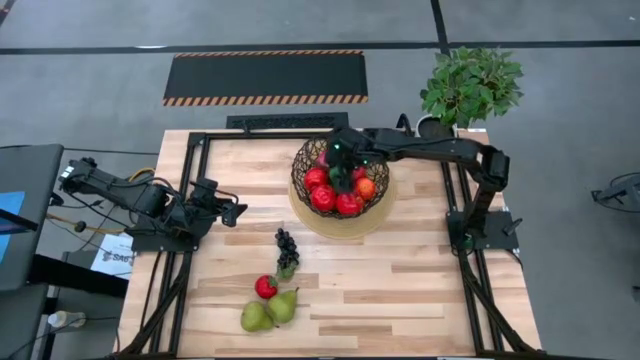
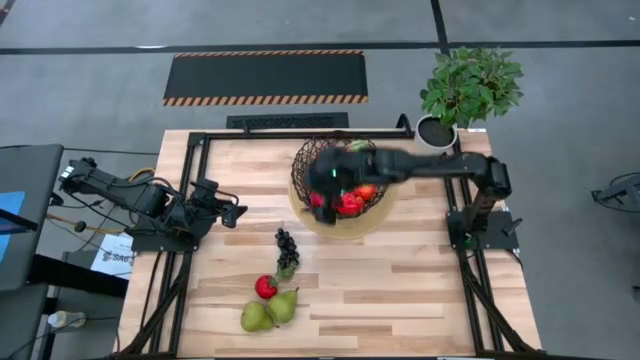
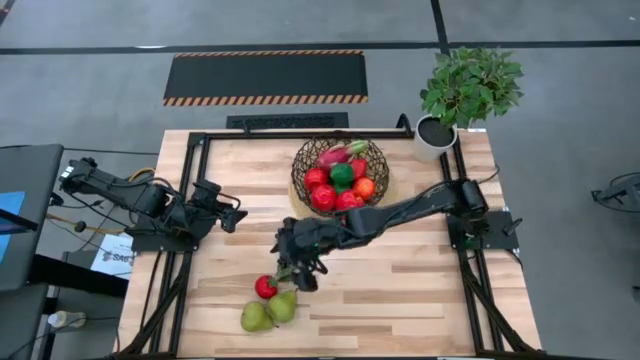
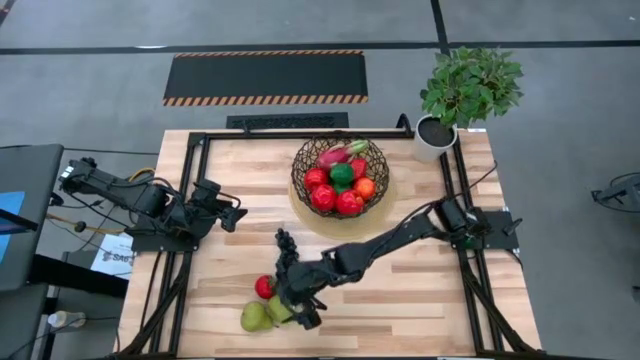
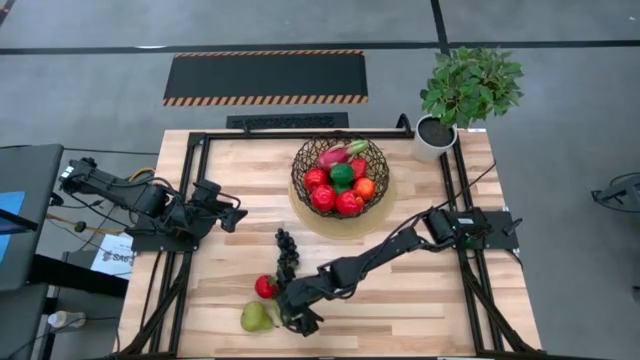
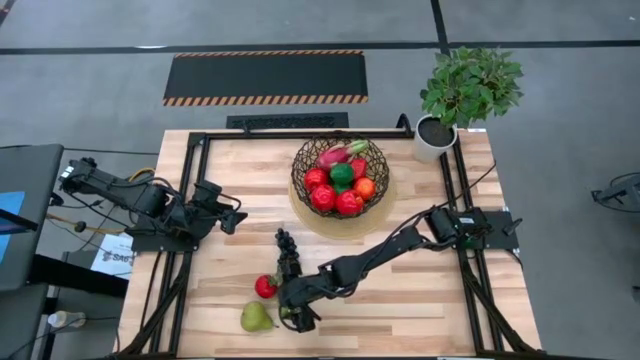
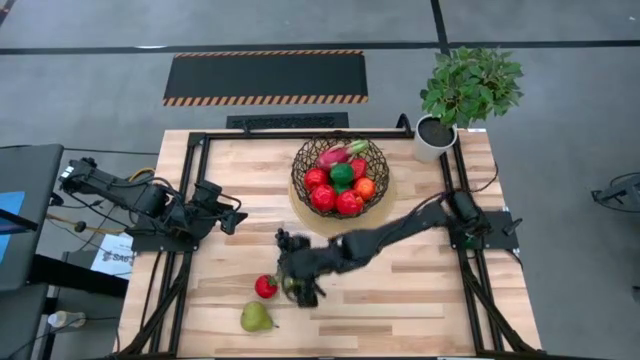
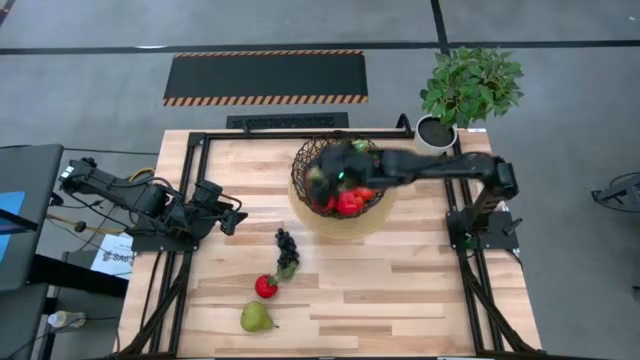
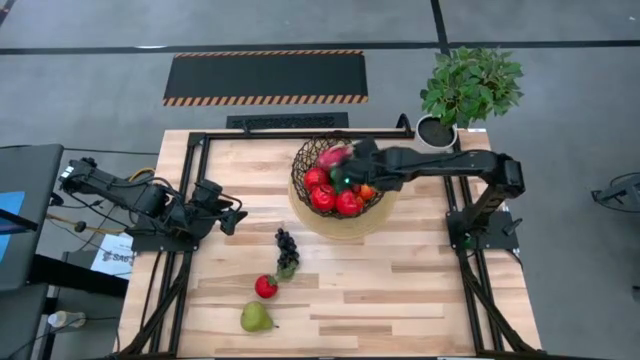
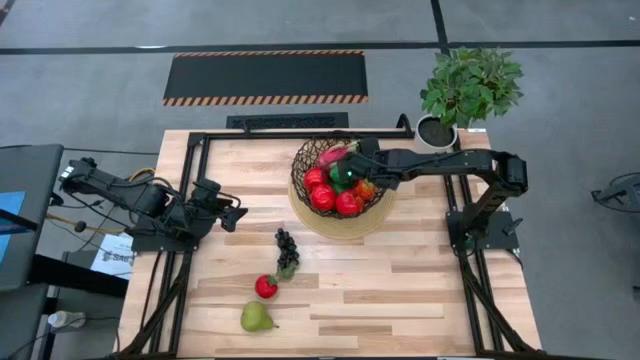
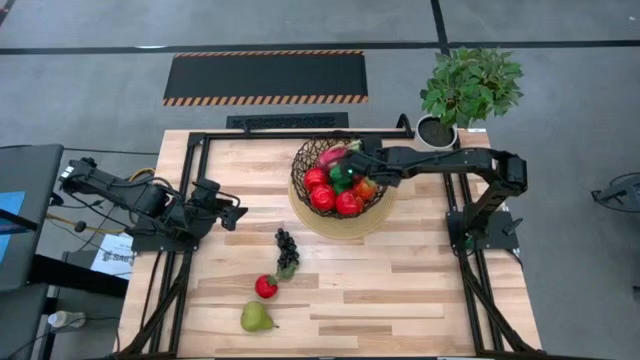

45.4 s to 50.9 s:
Task: Build produce basket
Put the green pear into the black wire basket

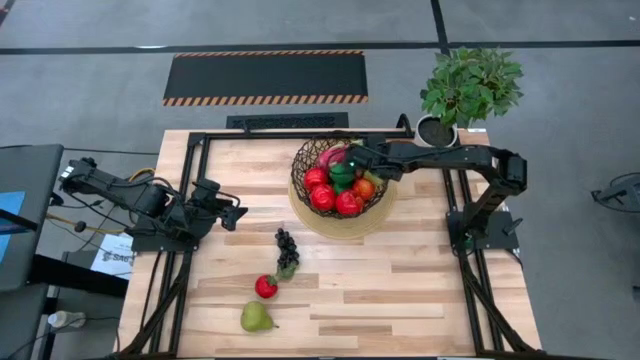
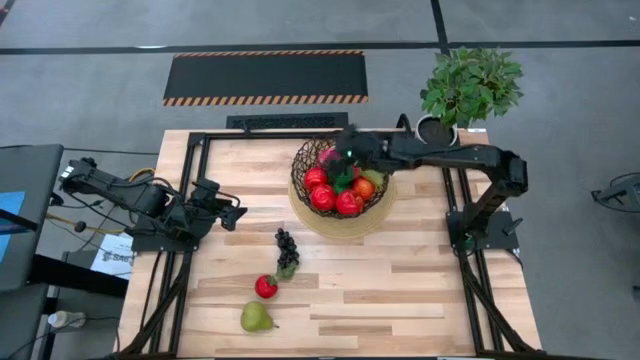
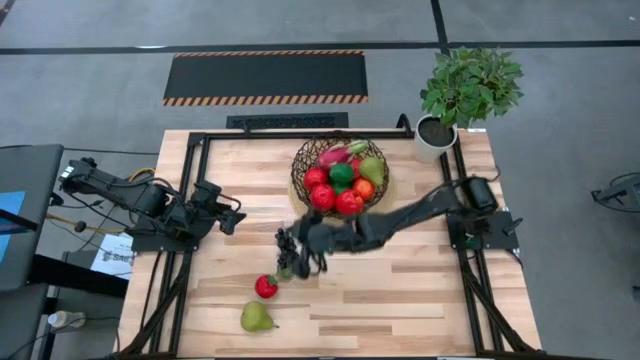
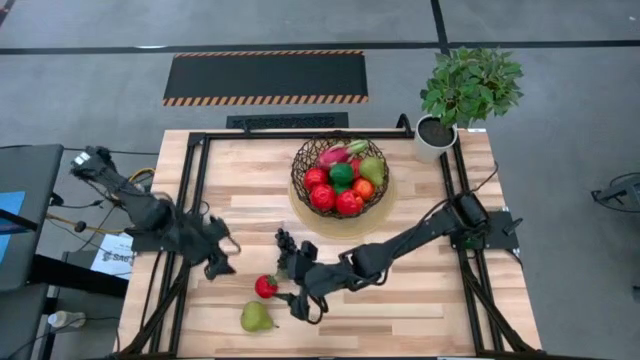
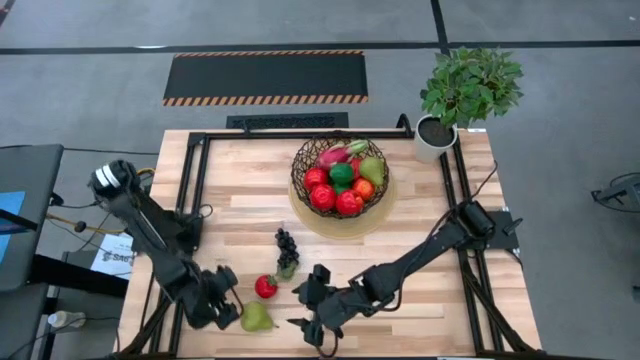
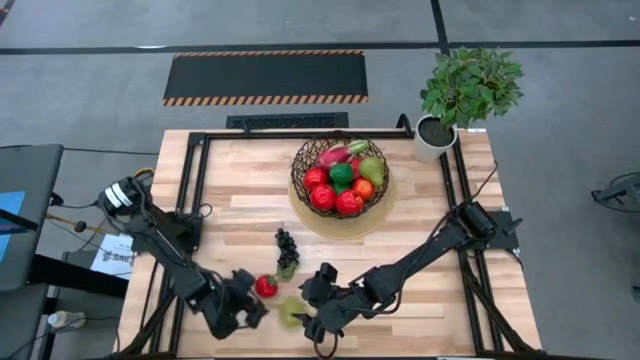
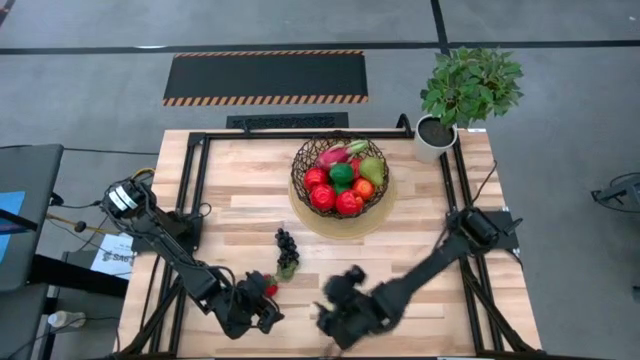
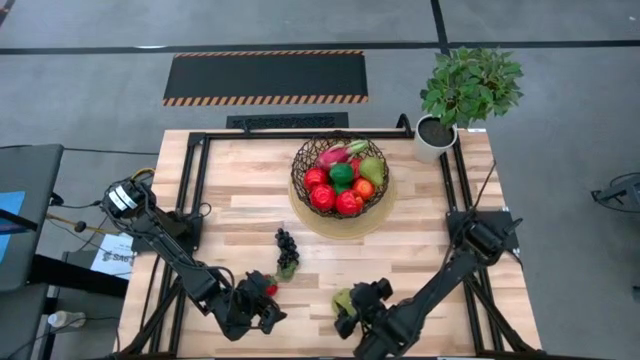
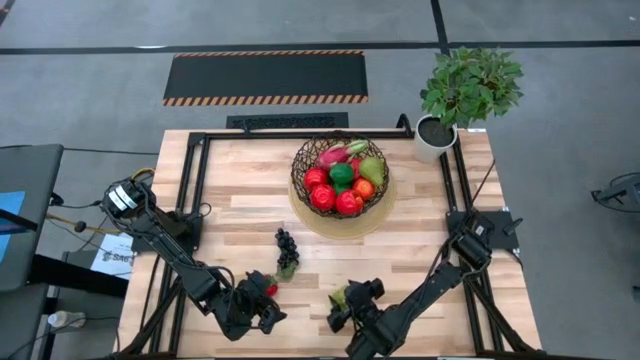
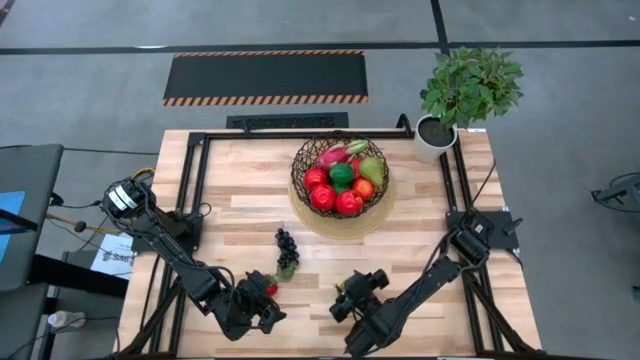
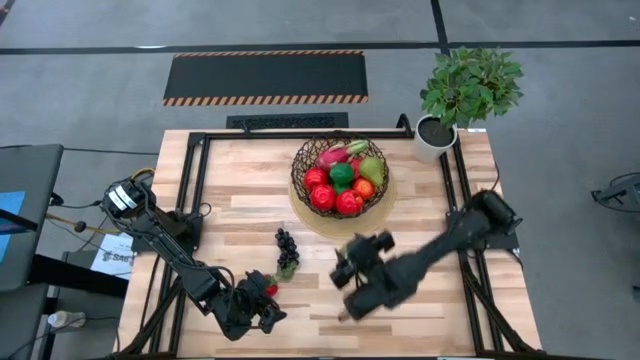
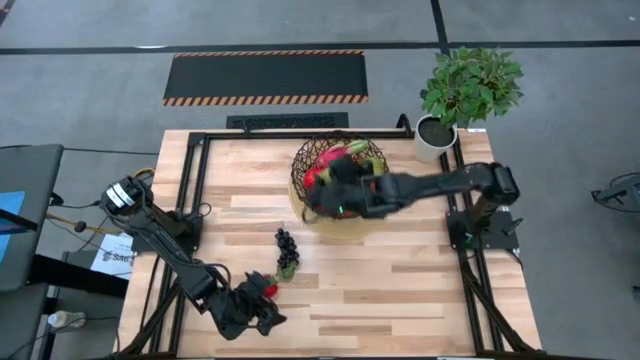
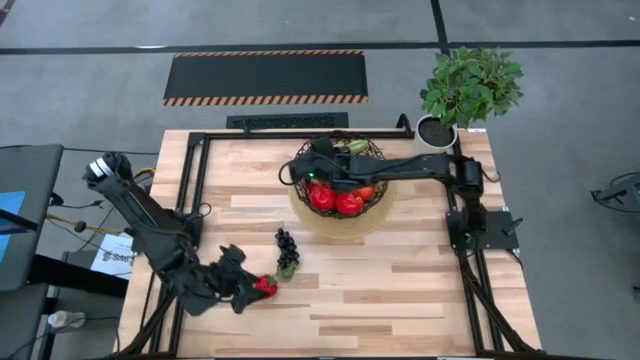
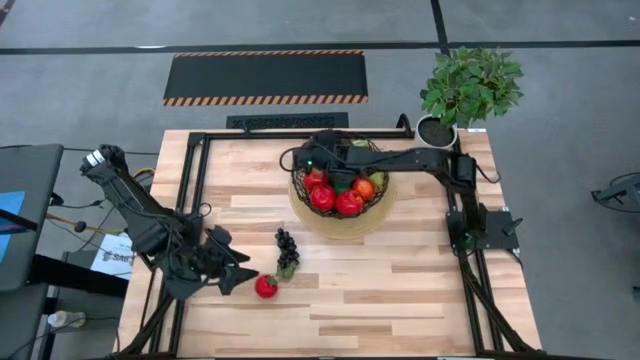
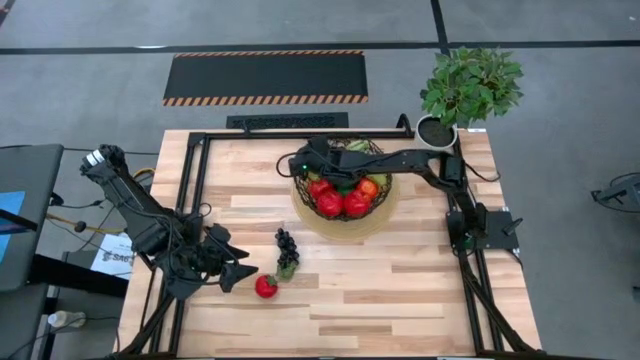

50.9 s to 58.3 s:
Put the green pear into the black wire basket

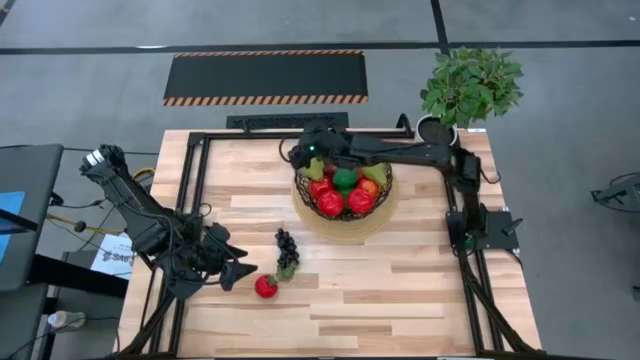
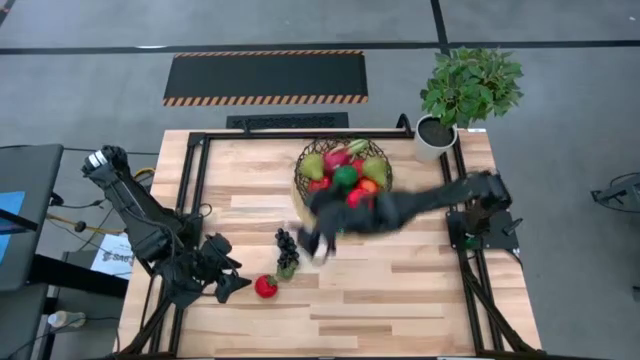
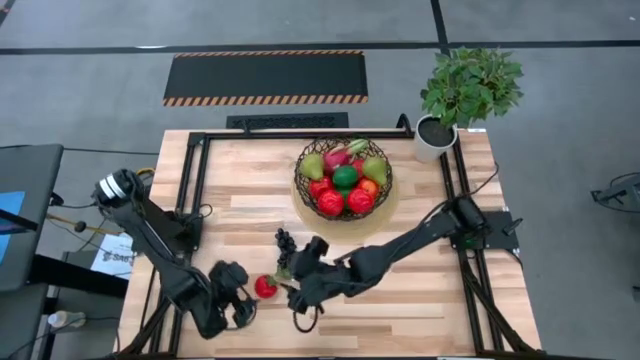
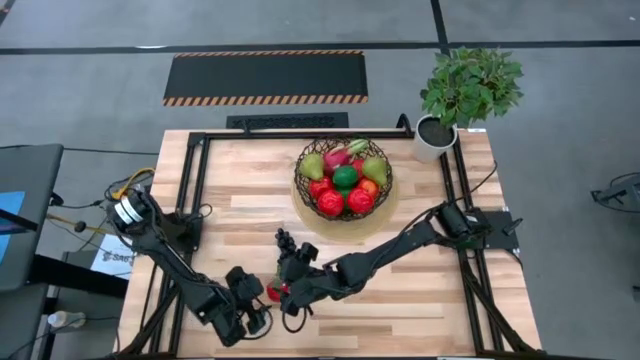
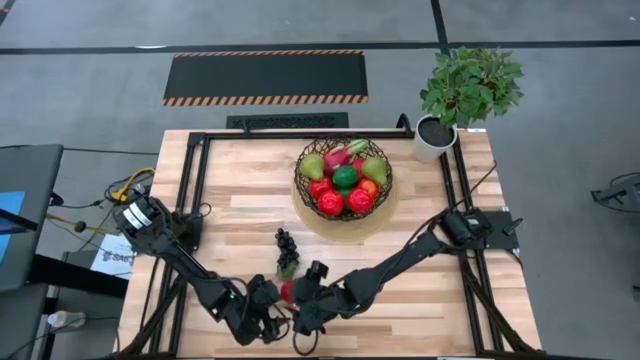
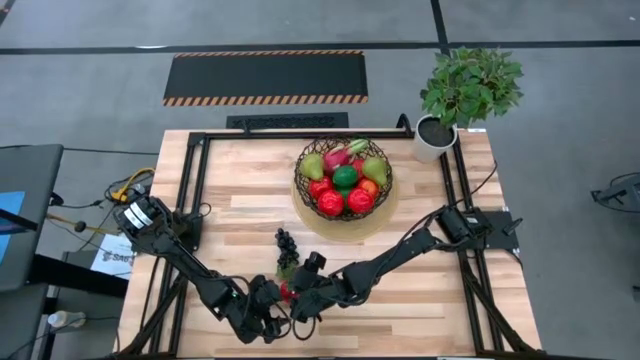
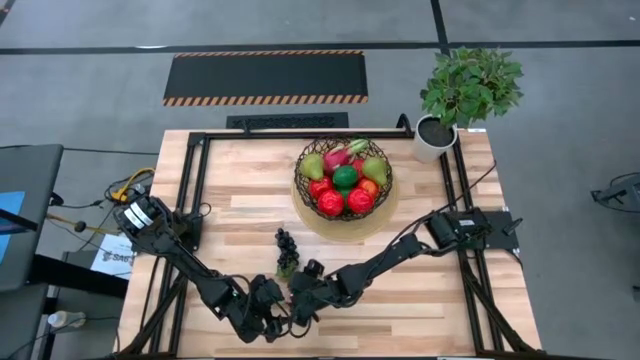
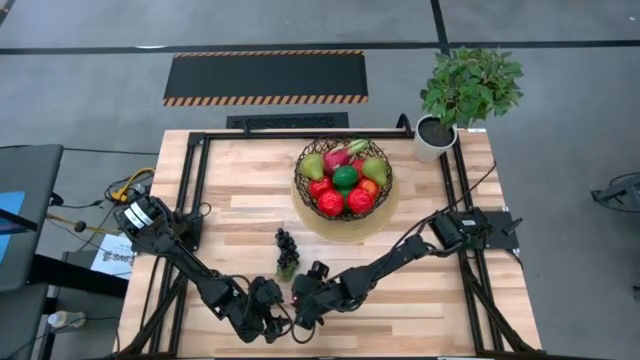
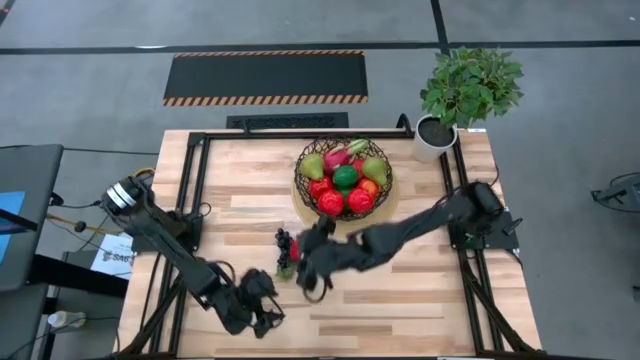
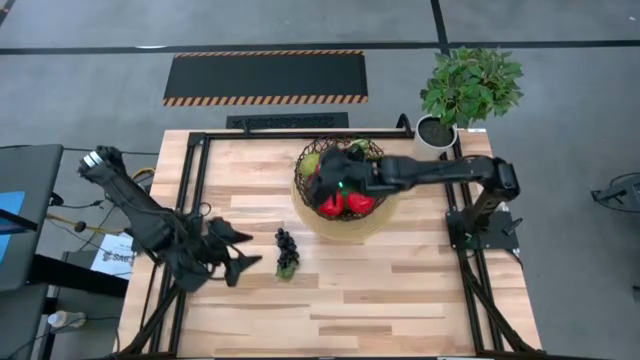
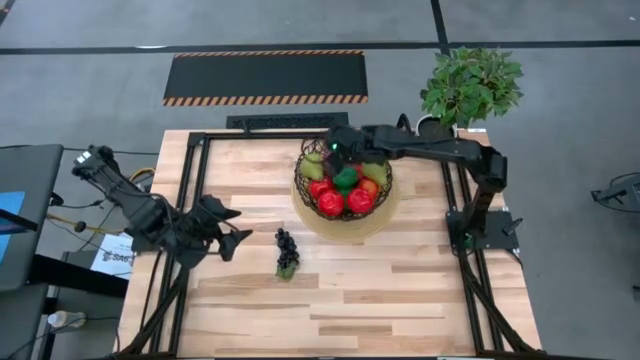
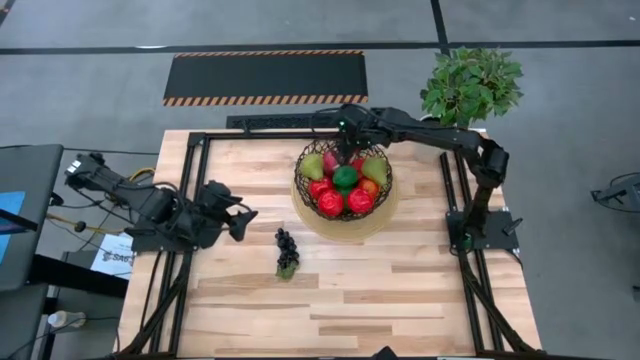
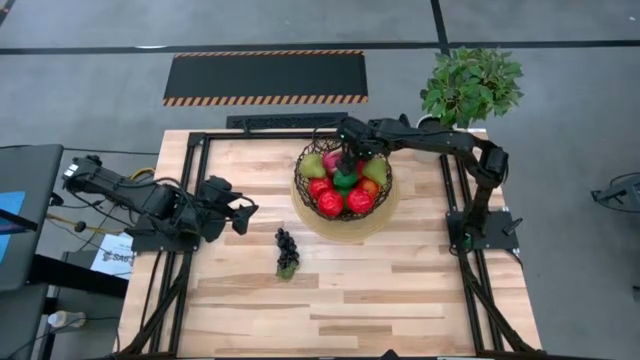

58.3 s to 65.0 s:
Put the red tomato into the black wire basket

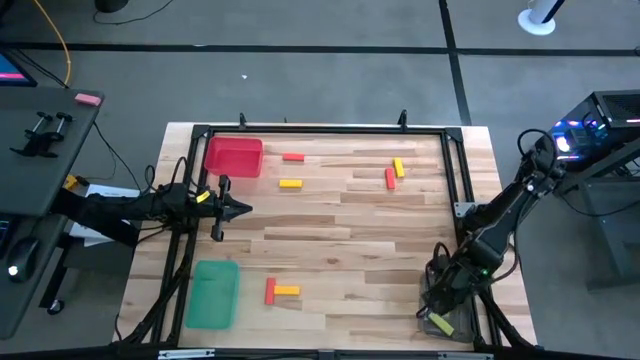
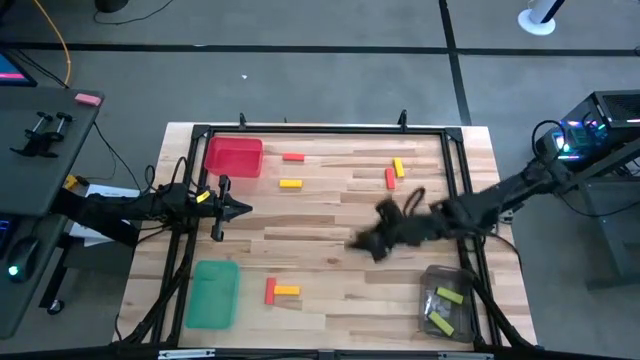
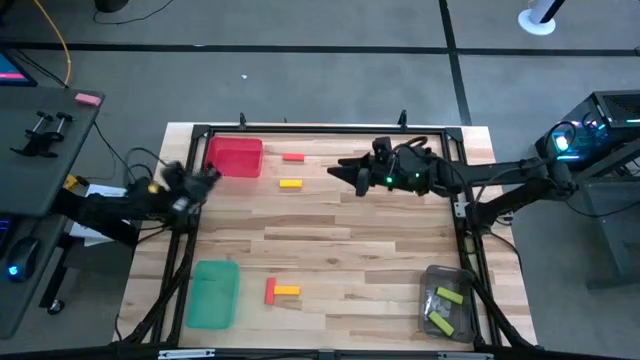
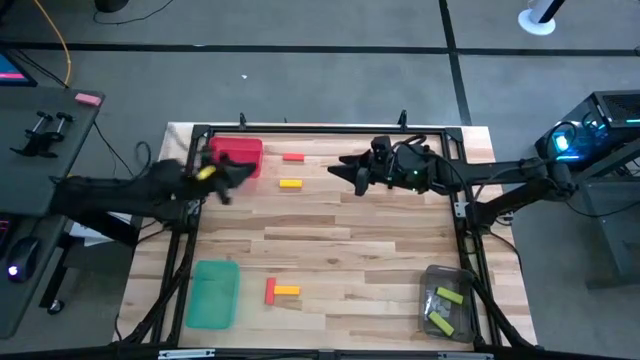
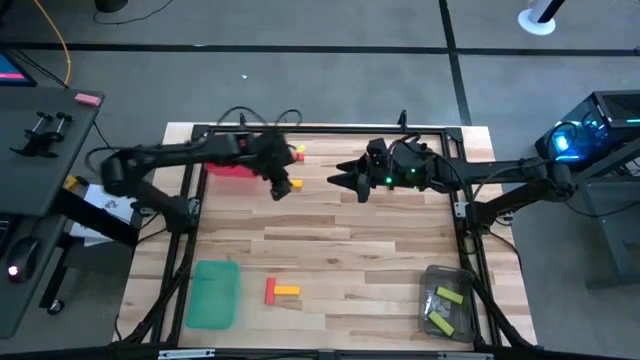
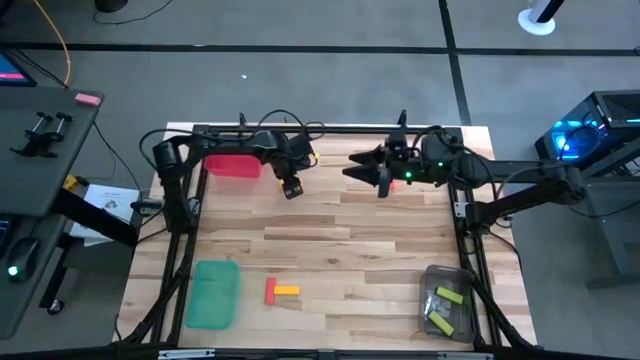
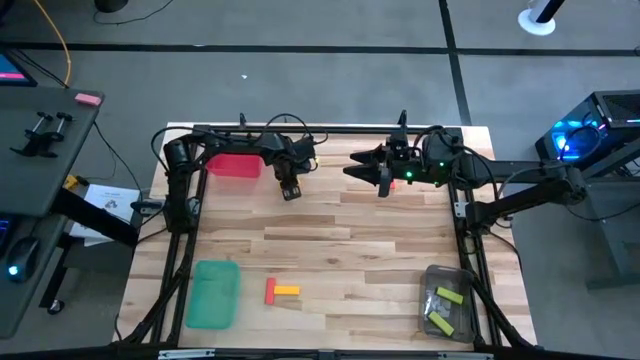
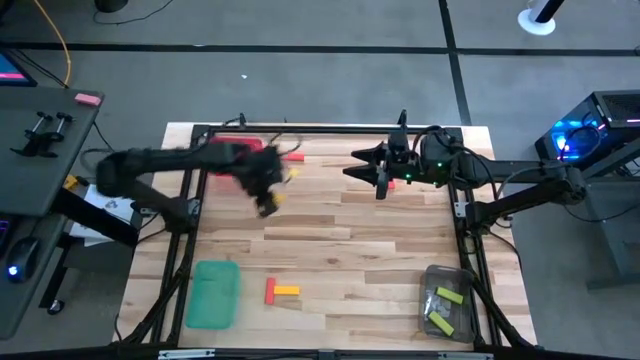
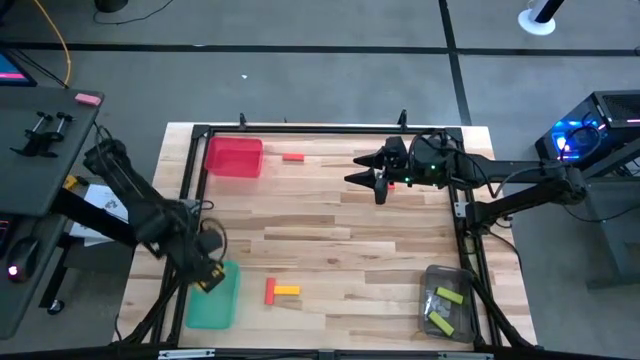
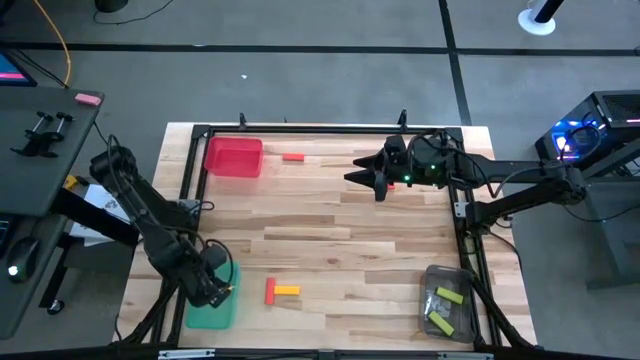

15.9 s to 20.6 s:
Task: Sort blocks
Put the top left yellow block into the green bin
